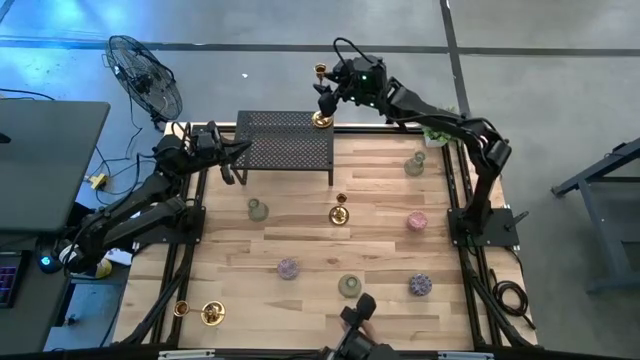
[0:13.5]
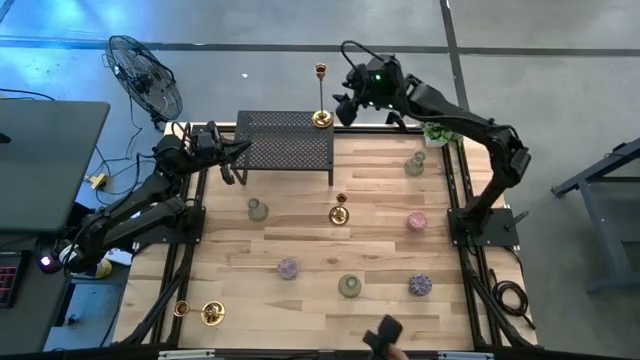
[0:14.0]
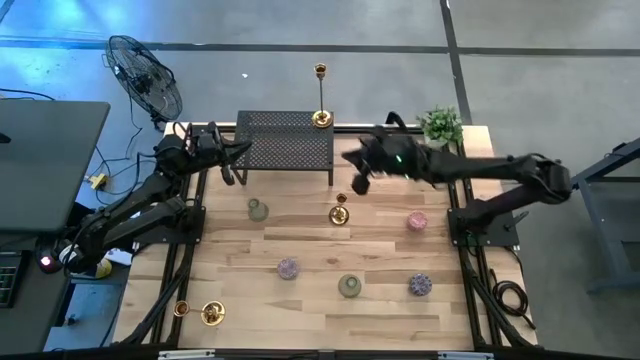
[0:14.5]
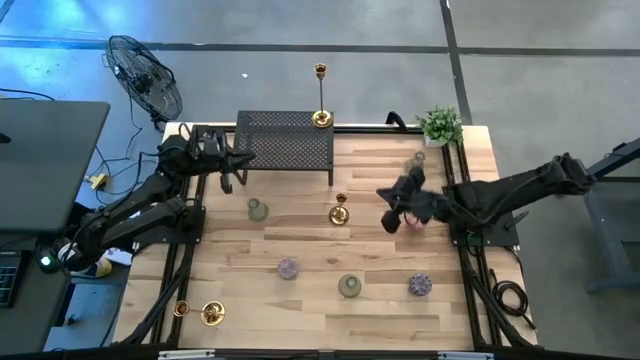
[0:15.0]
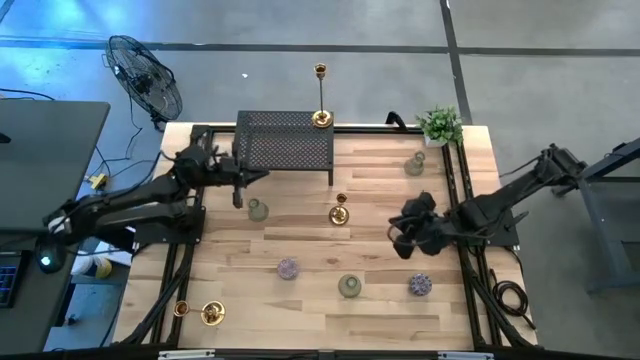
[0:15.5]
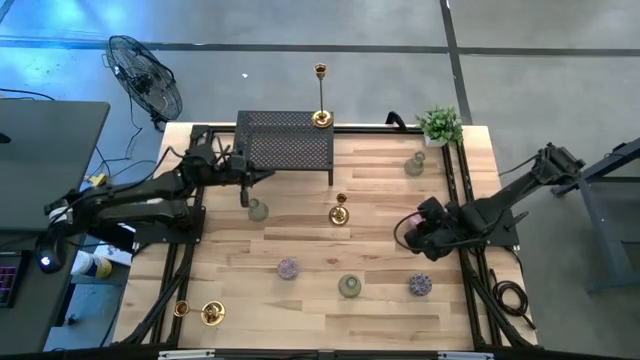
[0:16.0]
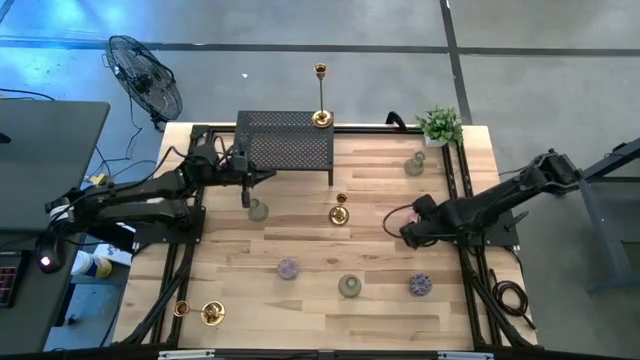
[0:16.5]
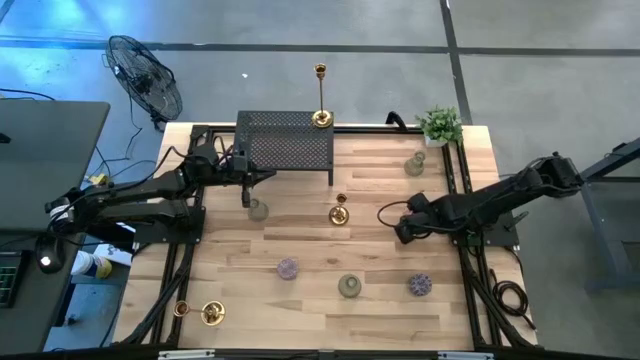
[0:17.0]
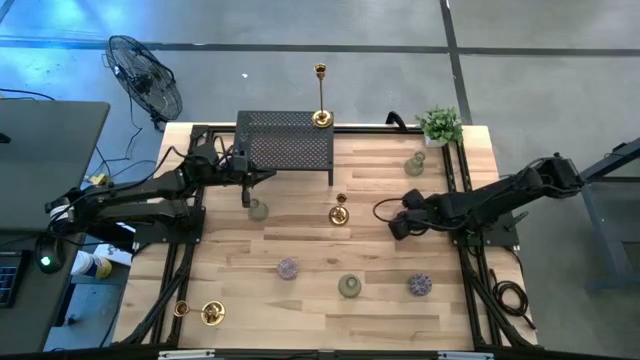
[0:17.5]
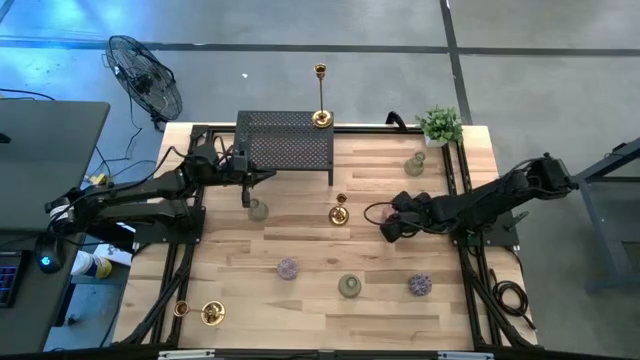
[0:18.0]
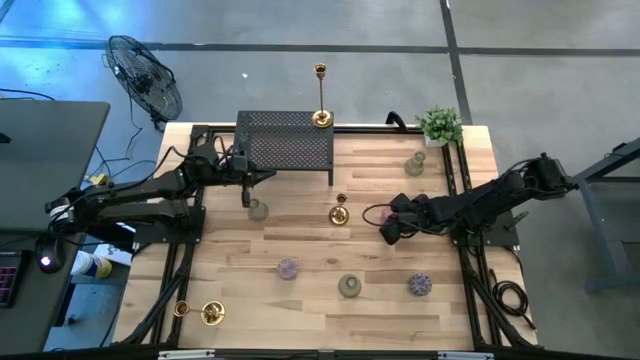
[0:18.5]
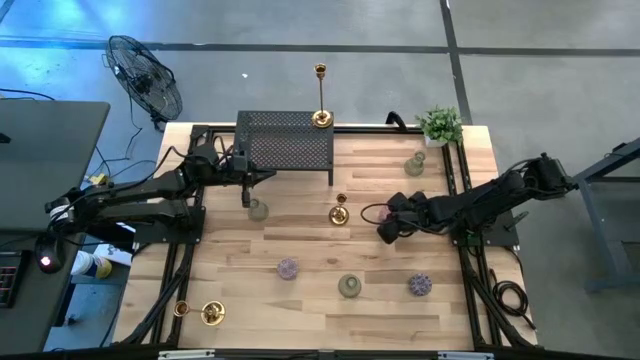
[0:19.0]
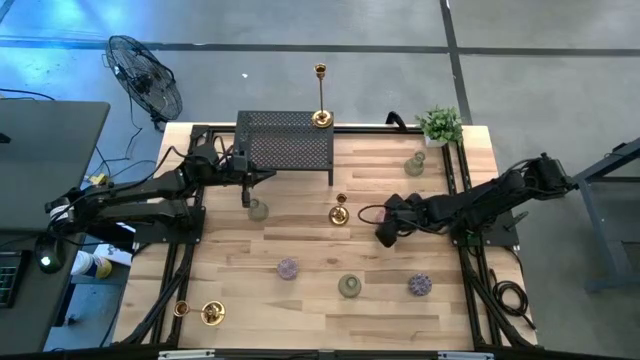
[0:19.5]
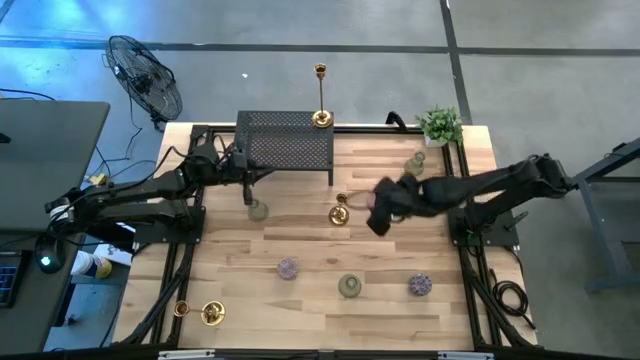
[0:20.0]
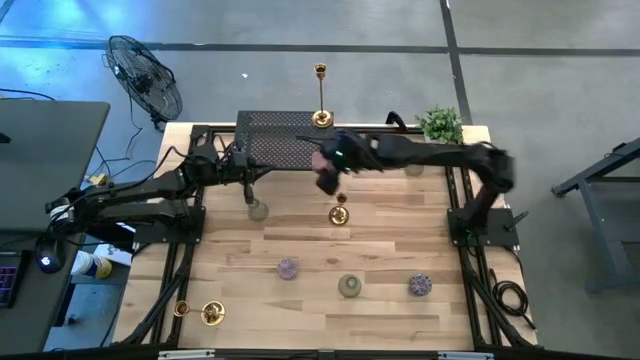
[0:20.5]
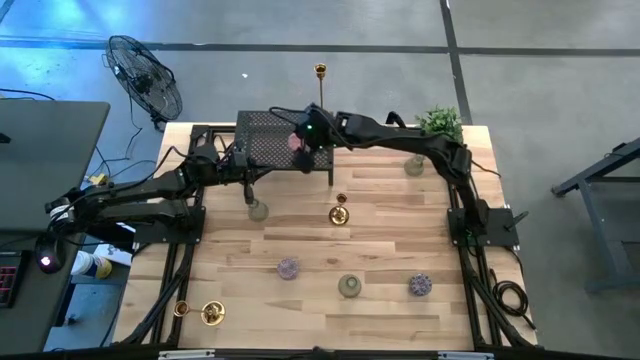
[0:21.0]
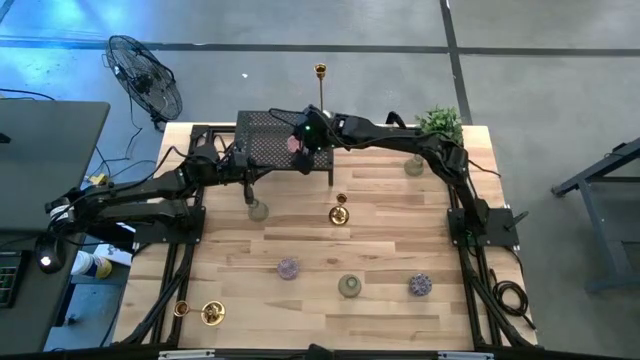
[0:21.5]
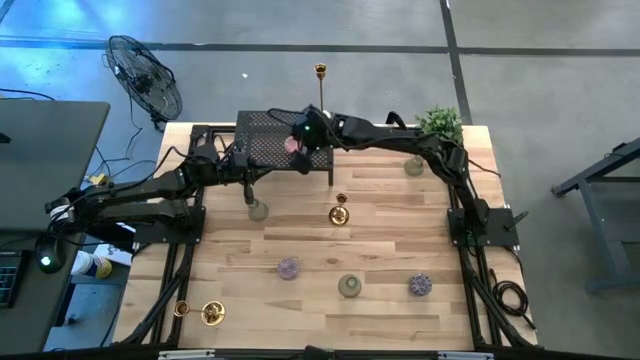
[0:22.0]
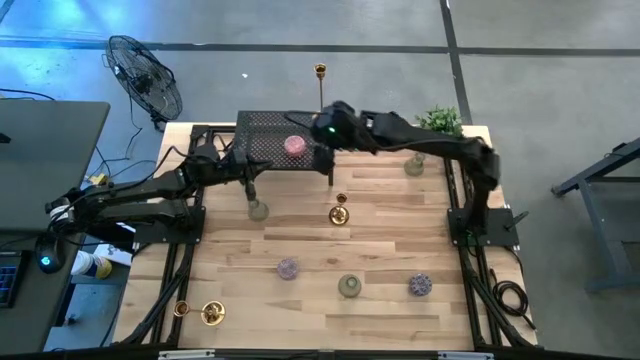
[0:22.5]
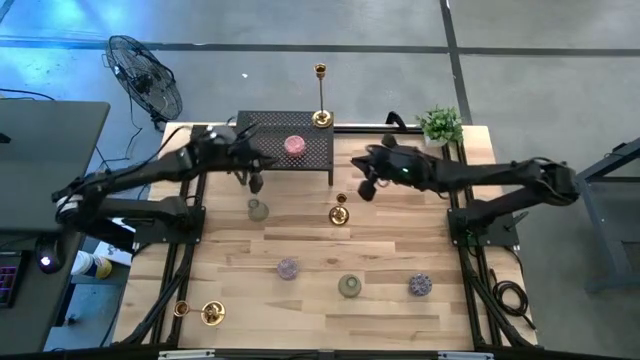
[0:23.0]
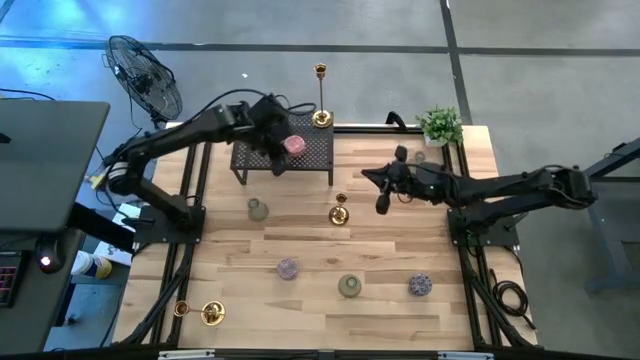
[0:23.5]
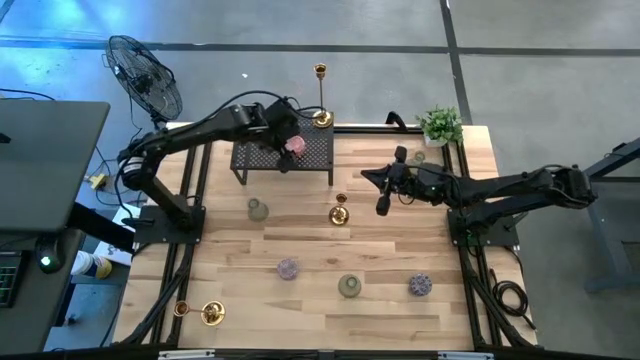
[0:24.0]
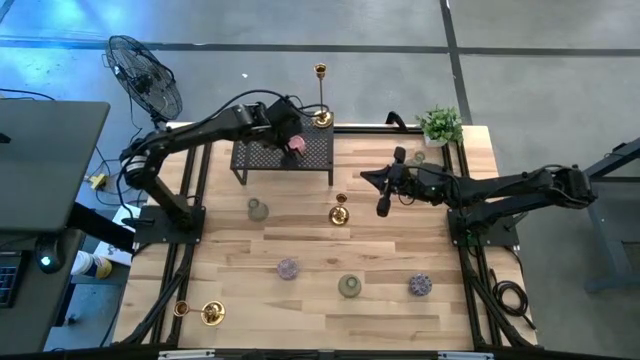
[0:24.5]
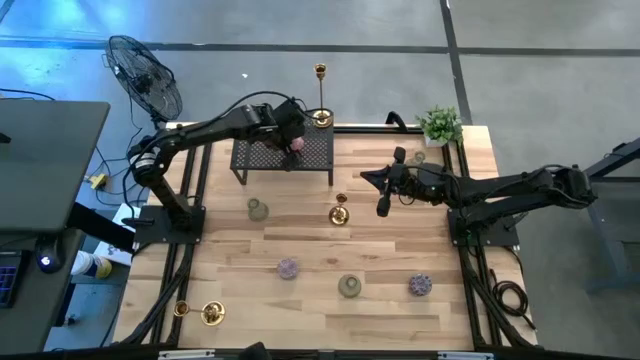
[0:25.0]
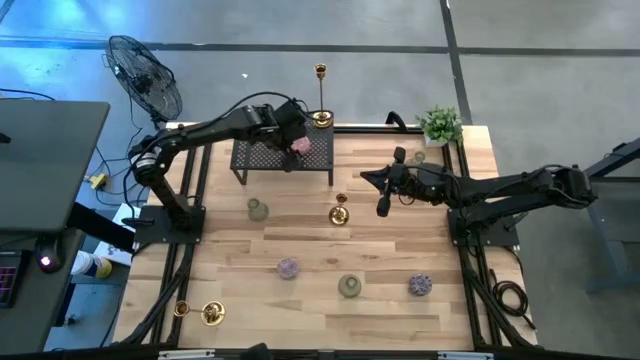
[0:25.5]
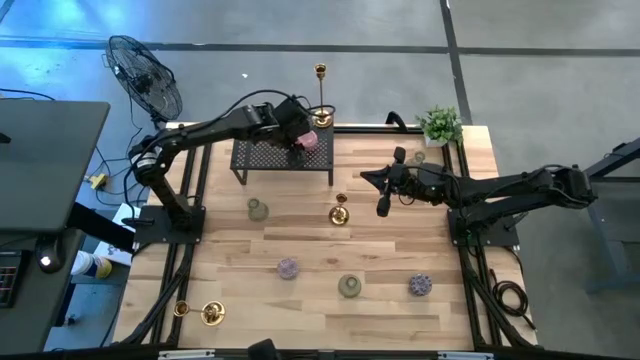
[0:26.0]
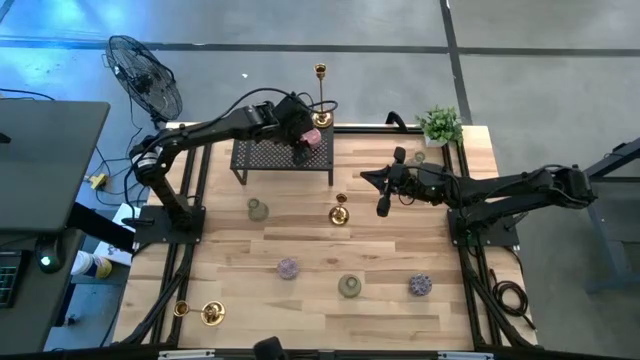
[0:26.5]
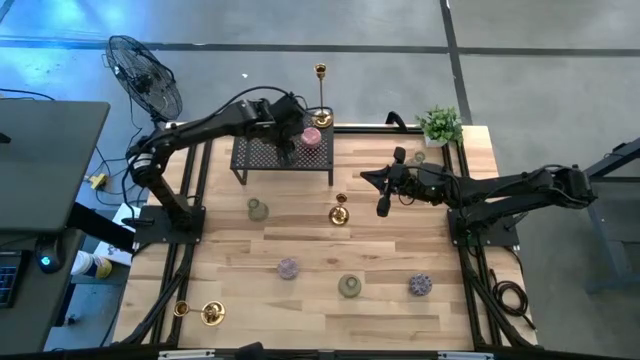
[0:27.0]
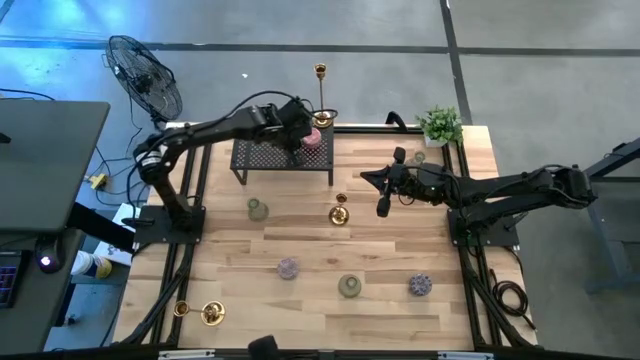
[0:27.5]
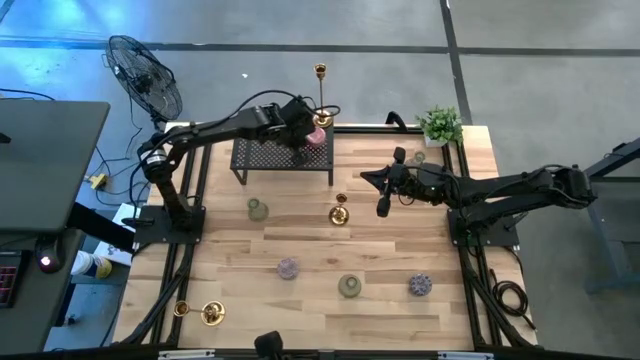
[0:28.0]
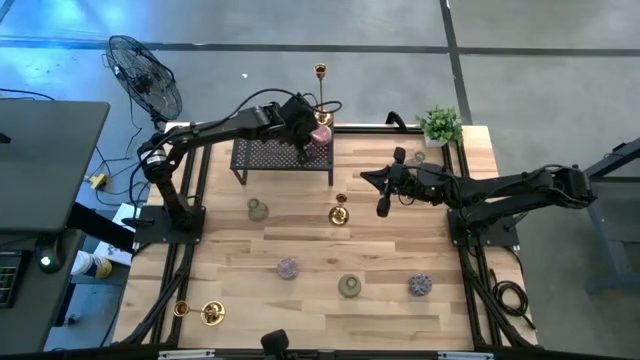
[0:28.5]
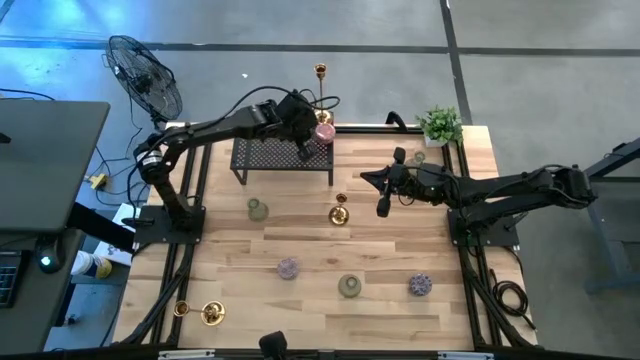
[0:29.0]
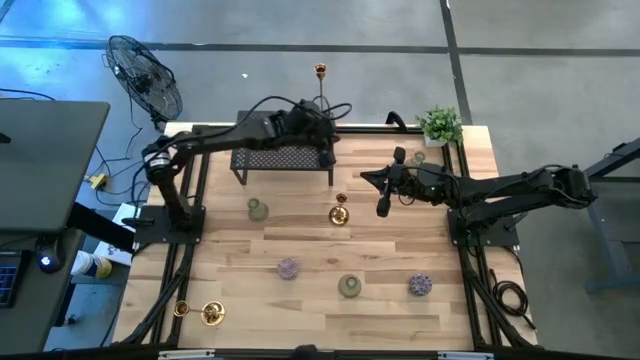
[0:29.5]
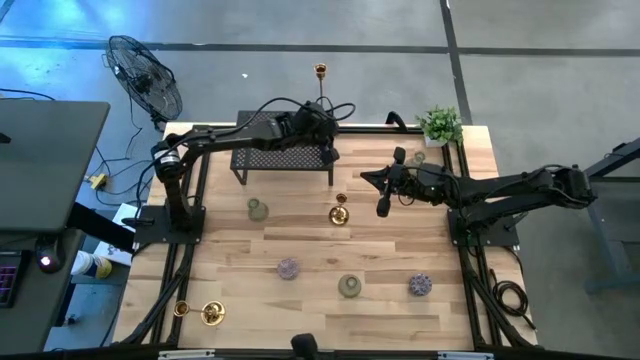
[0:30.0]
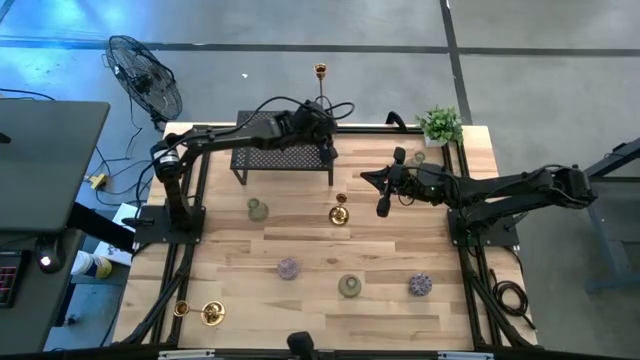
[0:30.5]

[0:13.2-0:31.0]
Task: Pick & Place candle stick holders
Put the pink patterned scented candle on the shelf

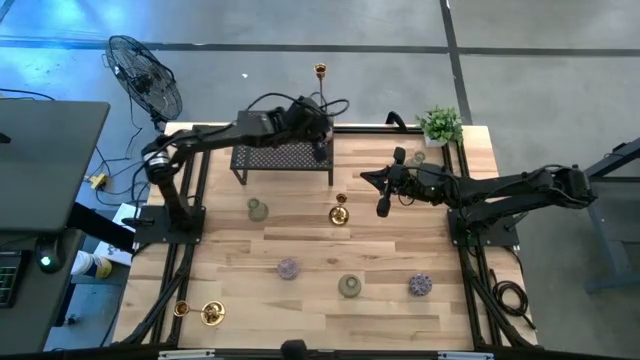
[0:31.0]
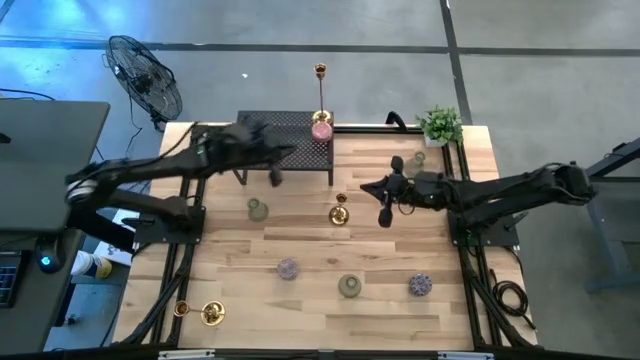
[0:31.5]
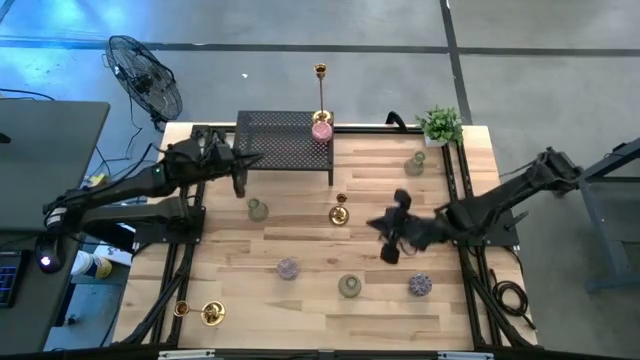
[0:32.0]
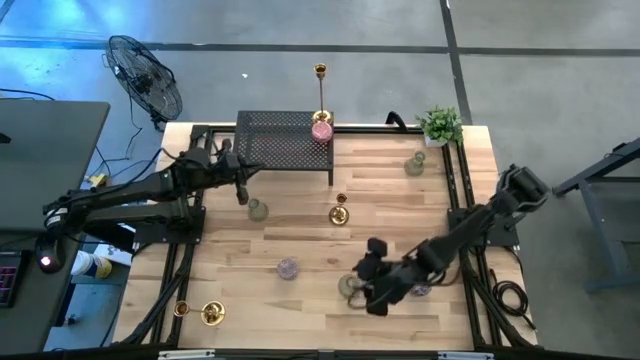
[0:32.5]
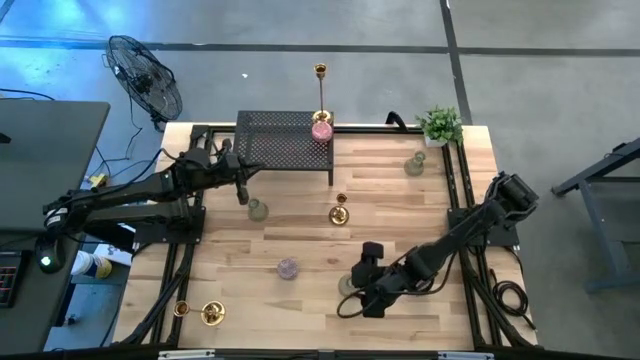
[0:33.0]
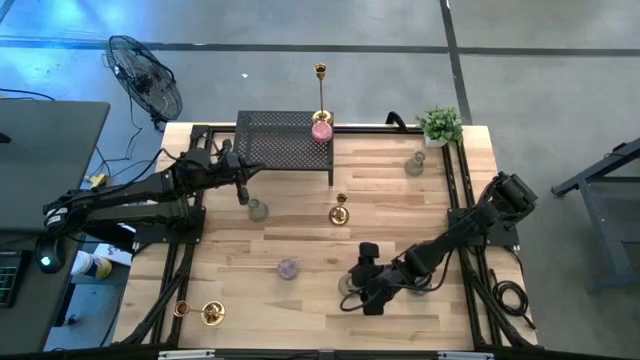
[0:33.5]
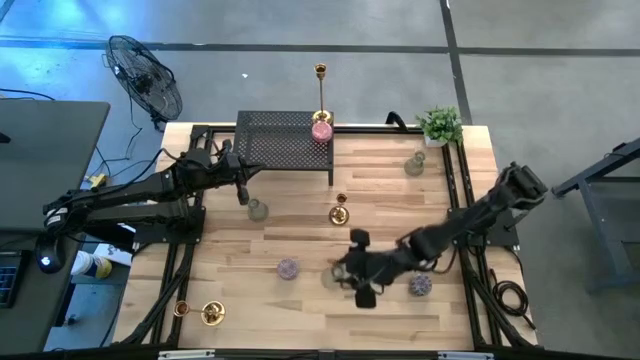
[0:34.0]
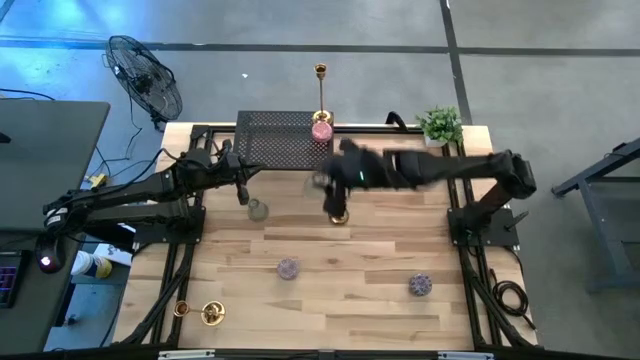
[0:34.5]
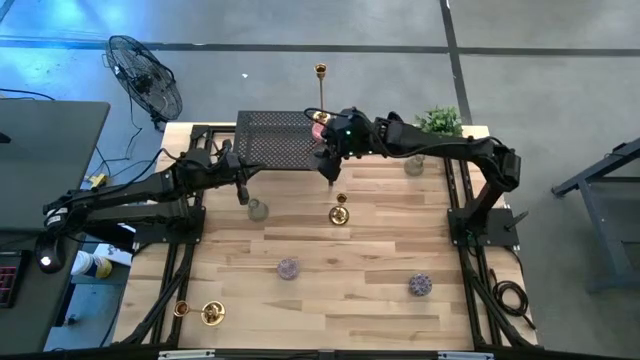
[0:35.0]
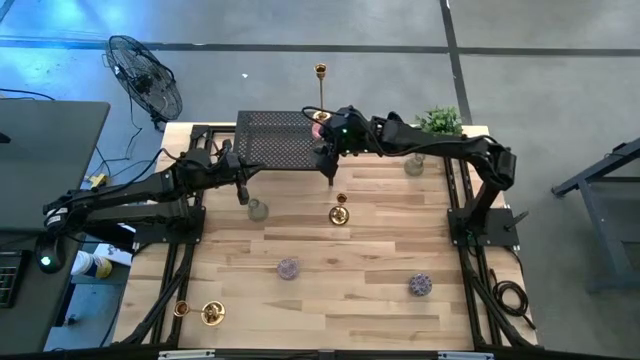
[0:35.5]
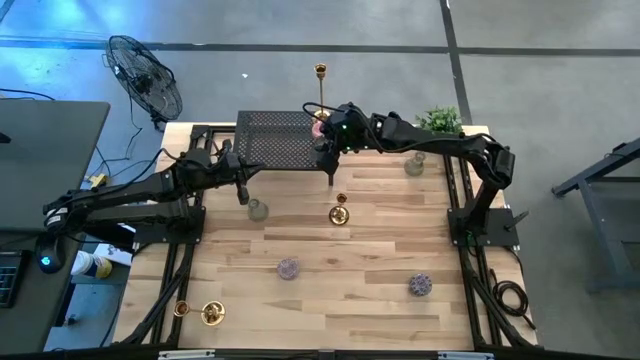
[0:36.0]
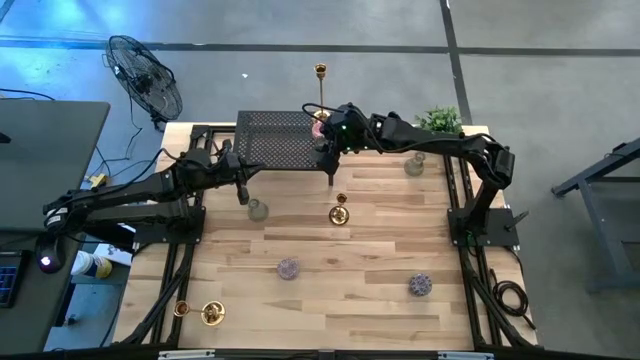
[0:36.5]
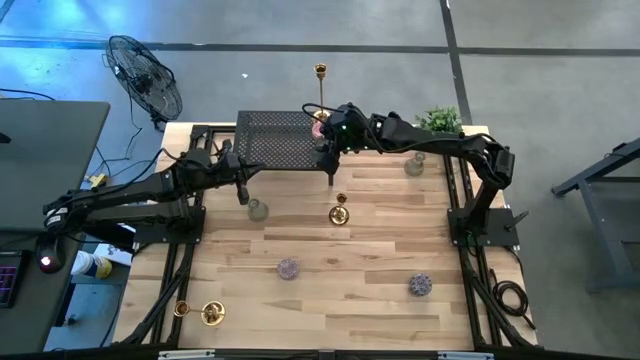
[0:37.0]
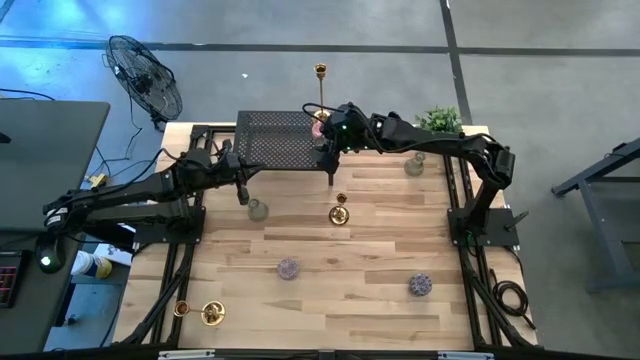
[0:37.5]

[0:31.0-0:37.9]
Put the bottom right green glass candle holder on the shelf
